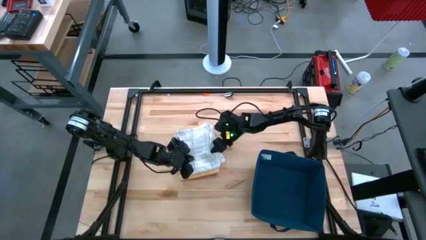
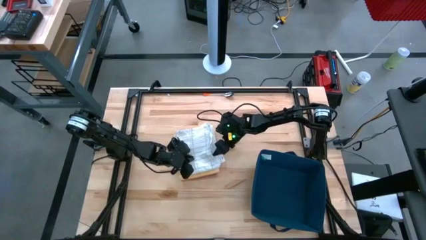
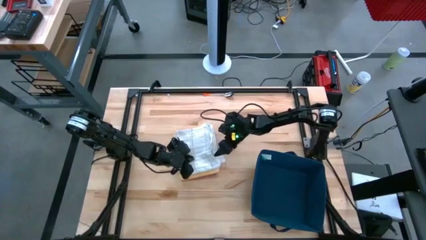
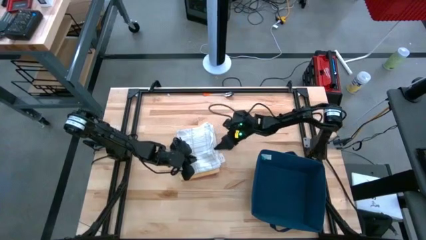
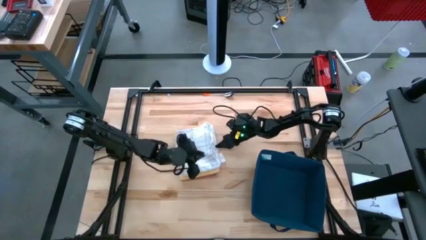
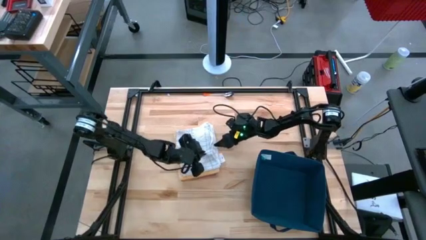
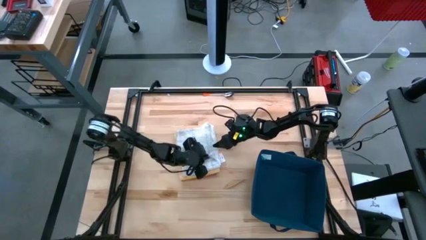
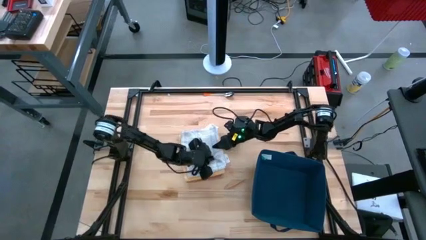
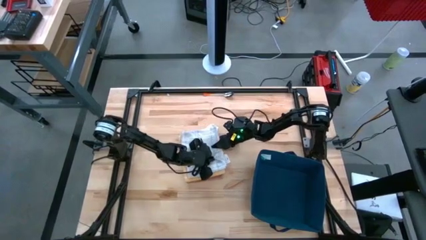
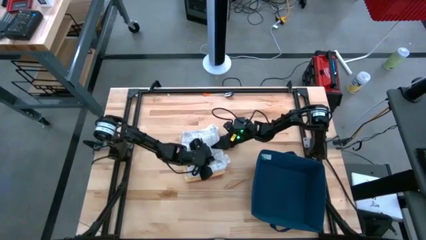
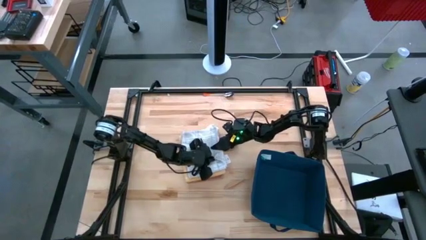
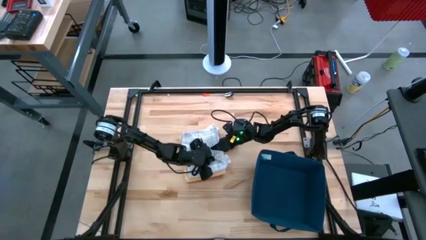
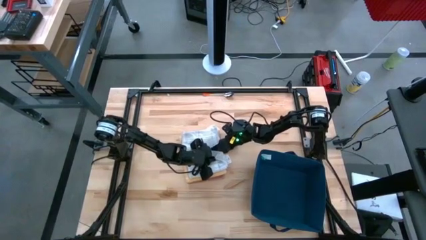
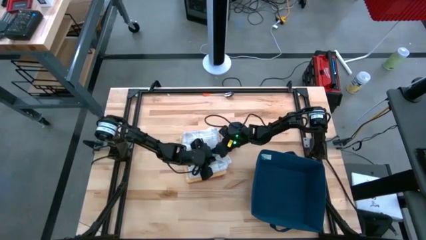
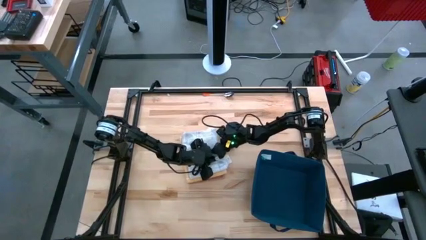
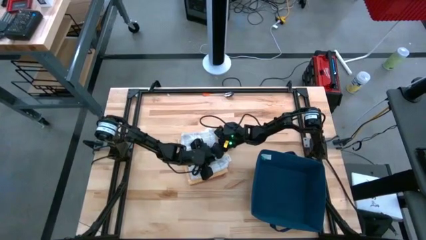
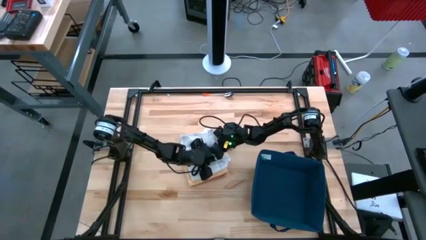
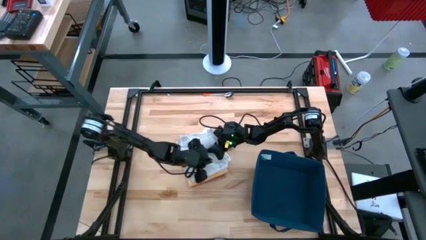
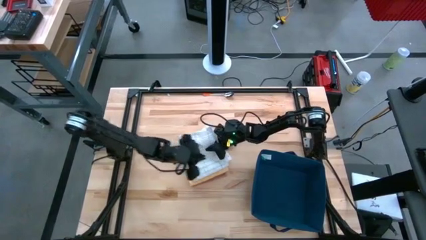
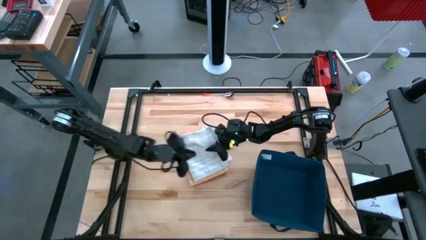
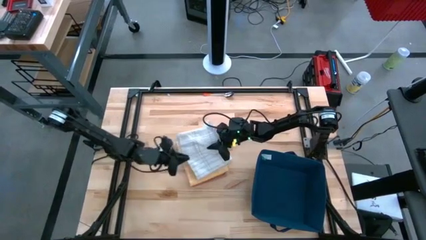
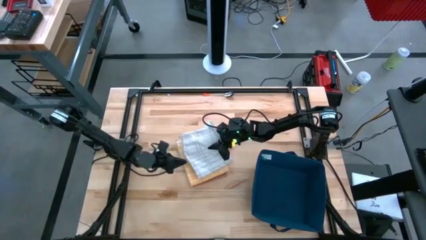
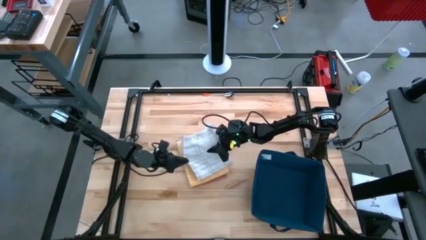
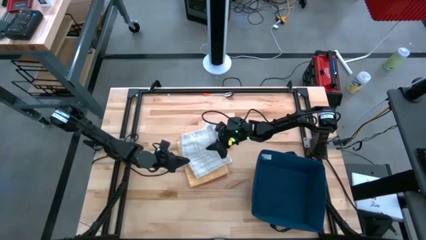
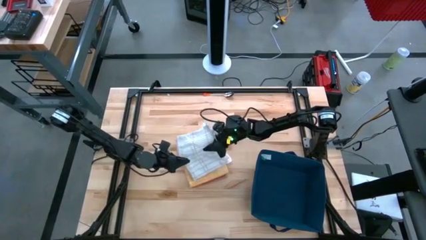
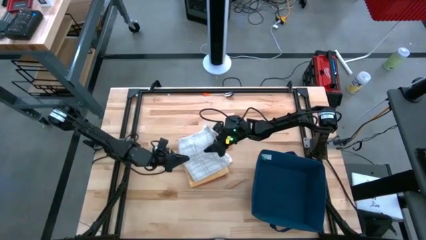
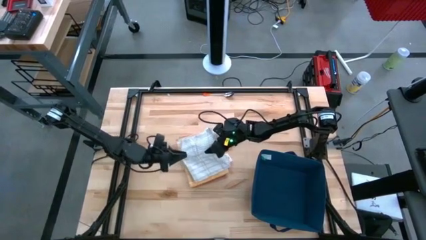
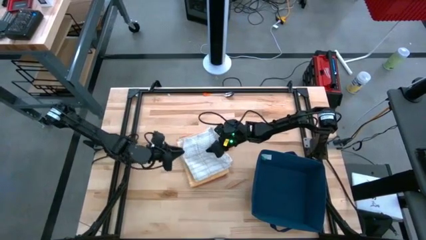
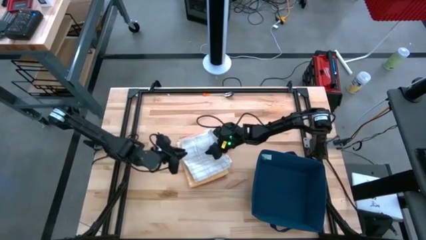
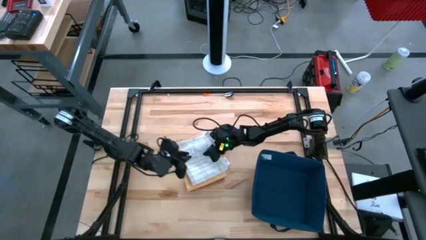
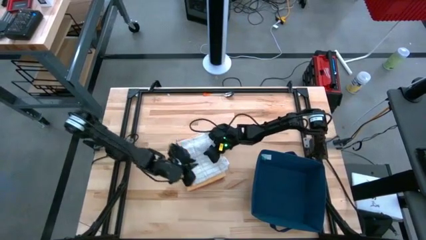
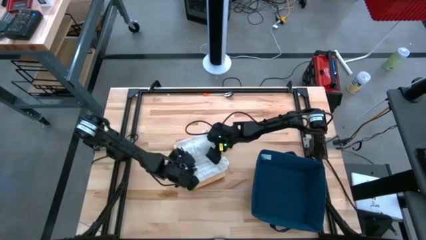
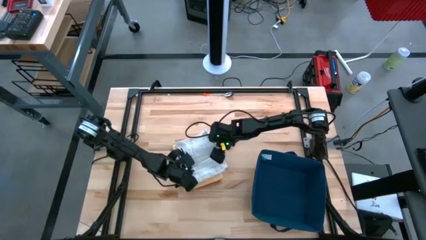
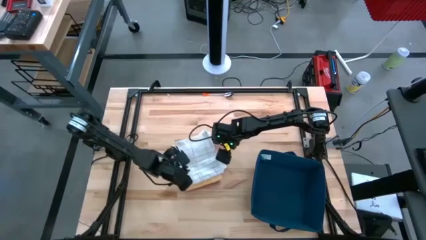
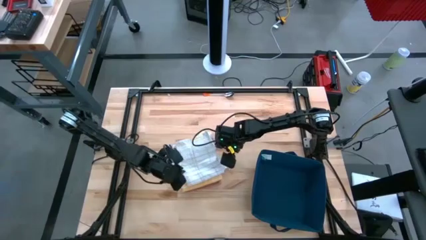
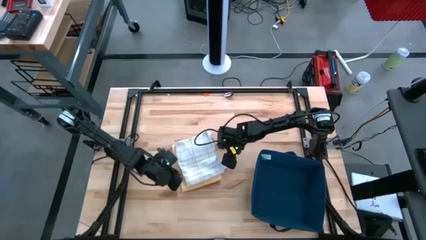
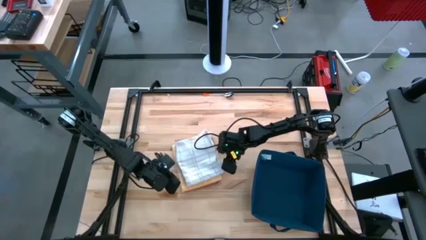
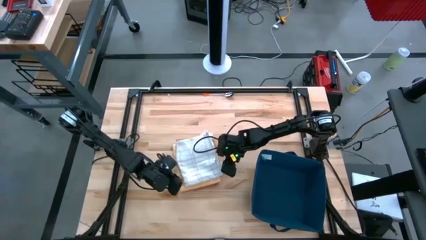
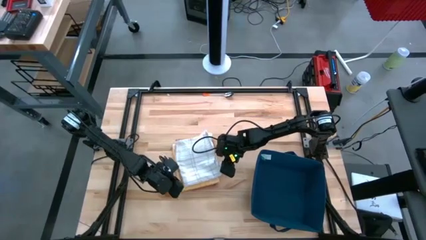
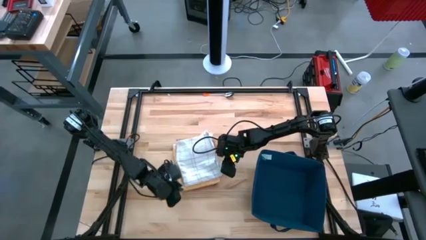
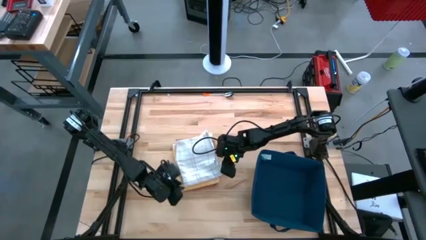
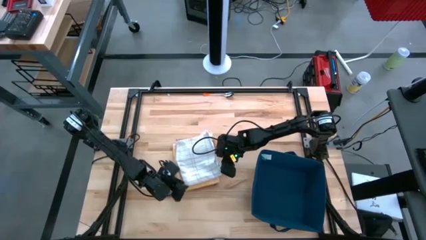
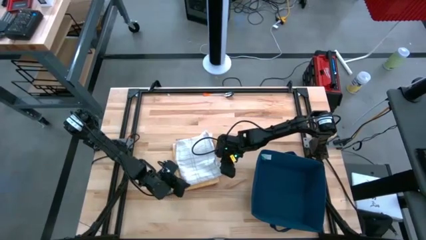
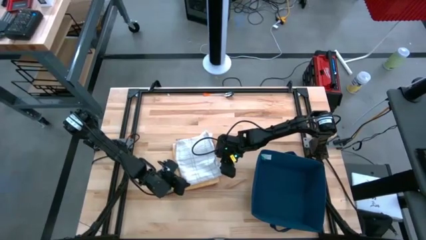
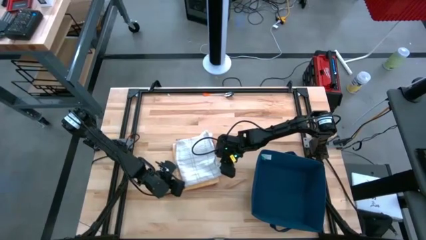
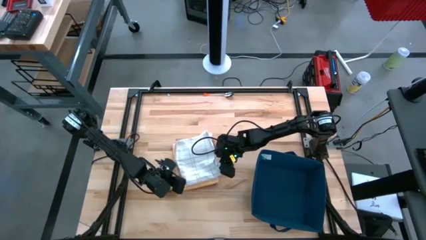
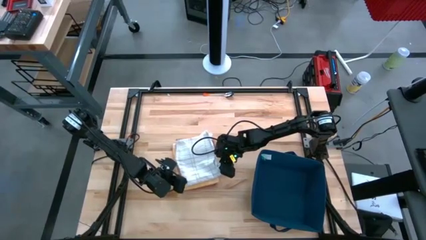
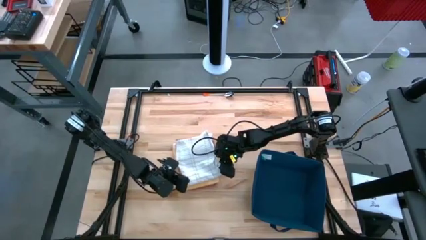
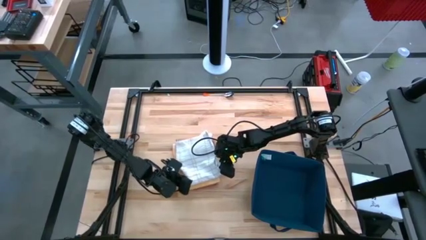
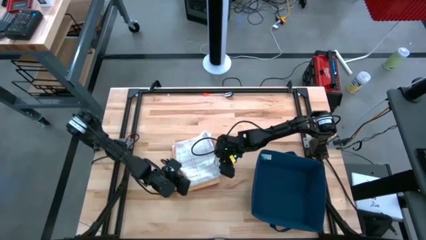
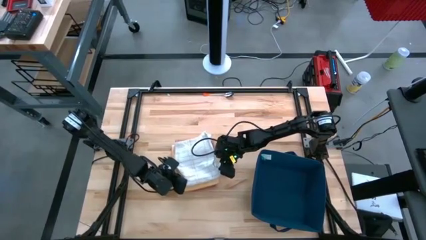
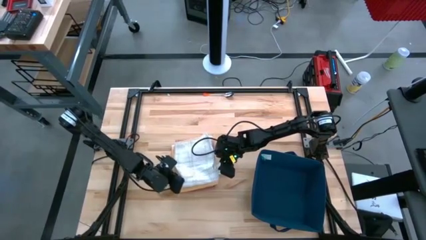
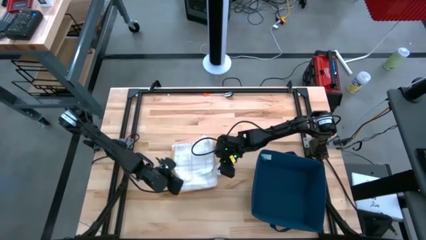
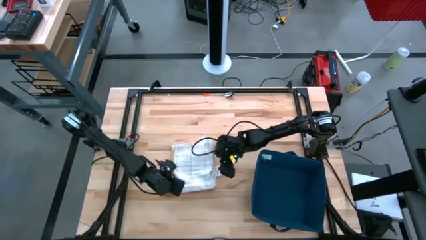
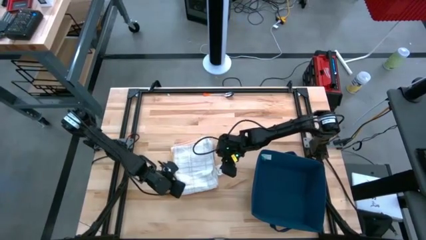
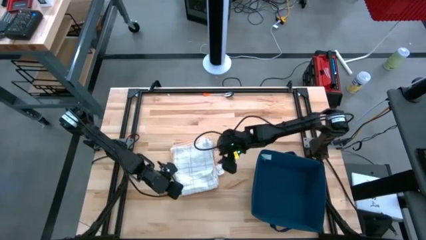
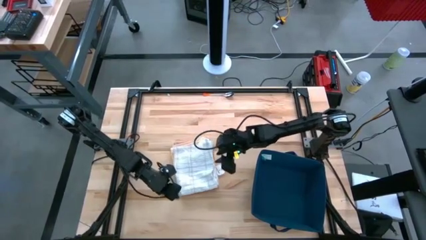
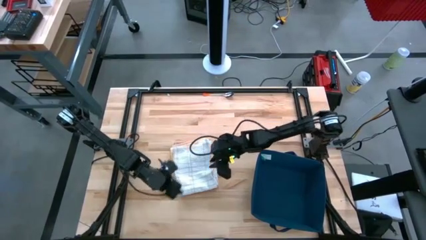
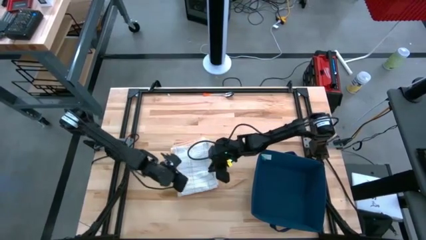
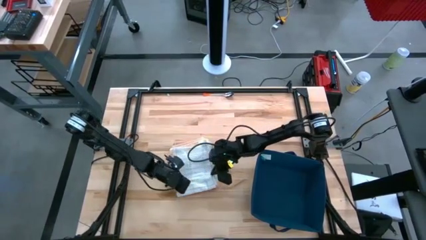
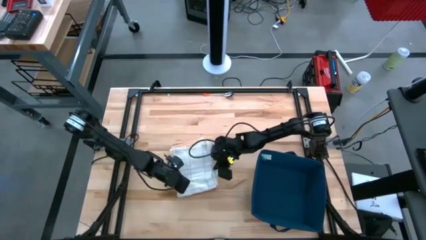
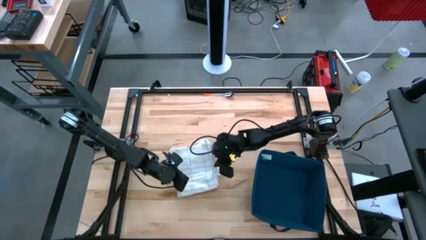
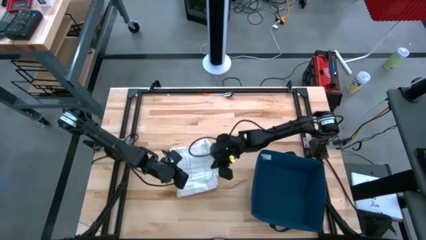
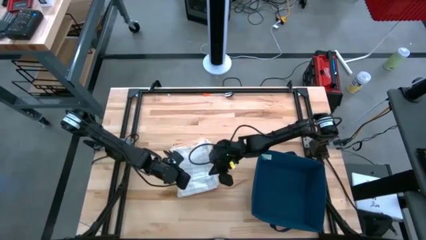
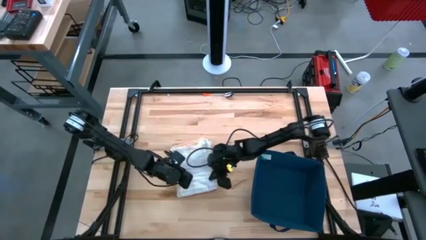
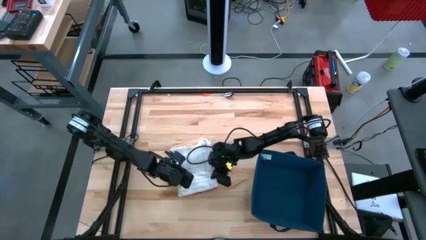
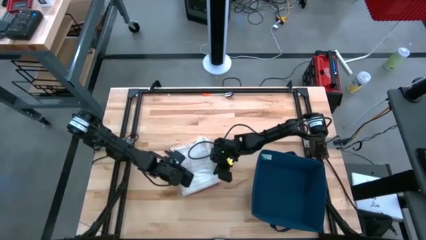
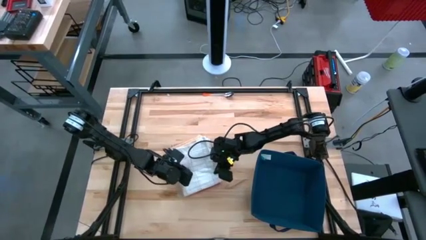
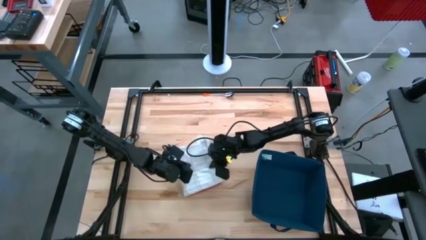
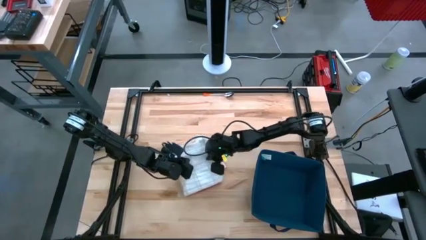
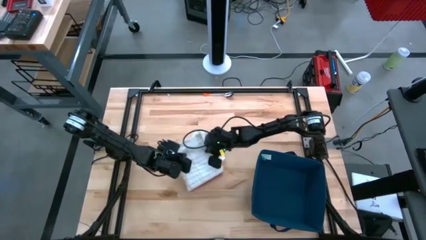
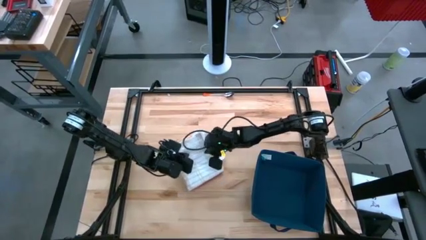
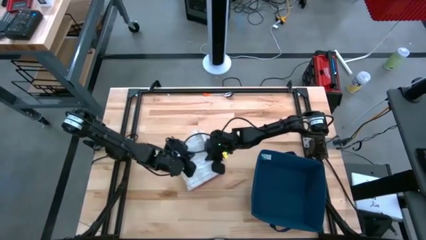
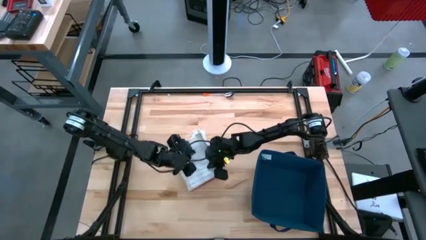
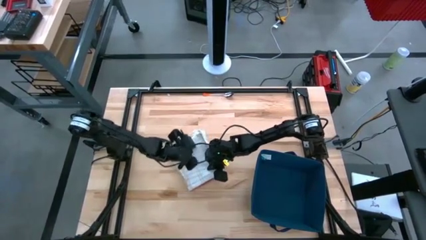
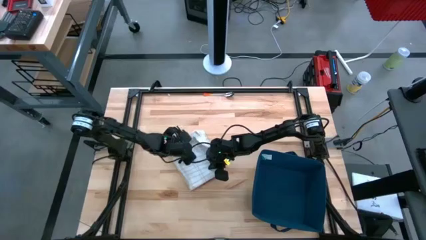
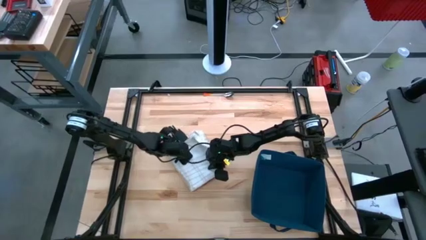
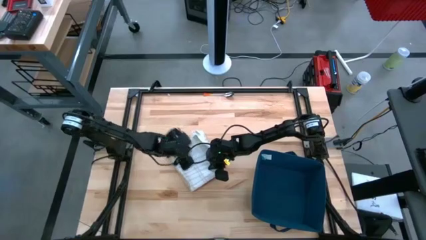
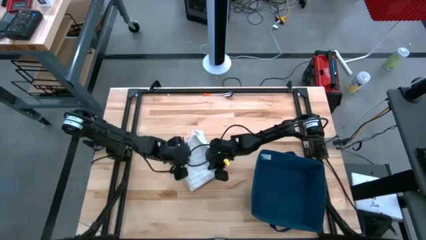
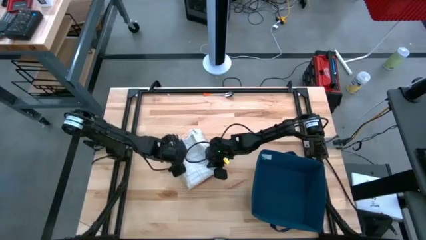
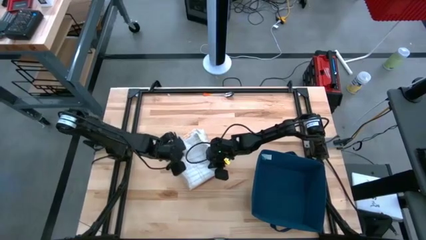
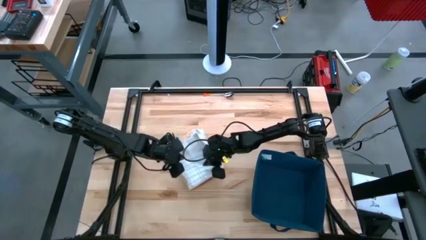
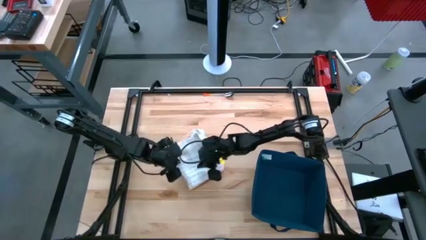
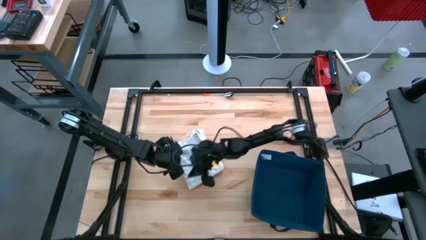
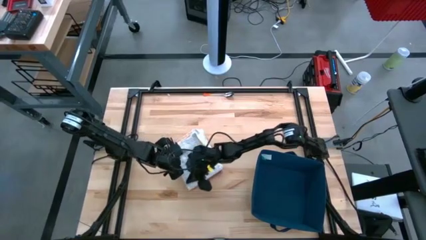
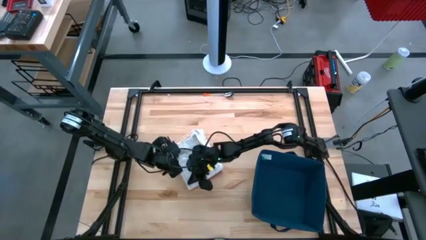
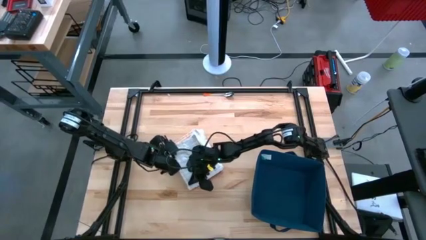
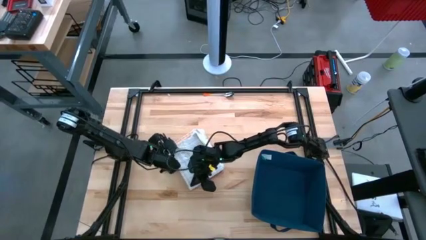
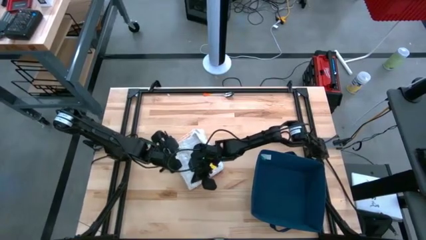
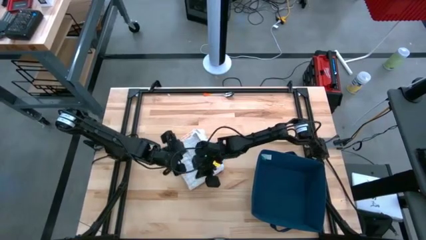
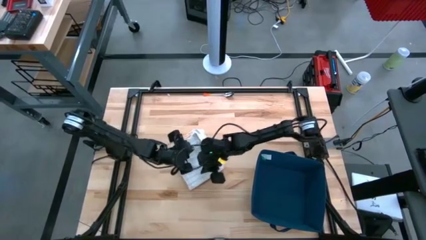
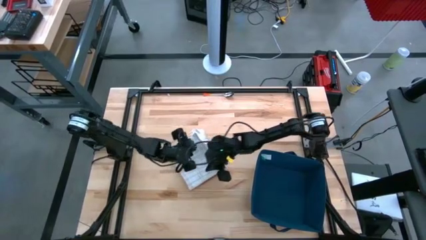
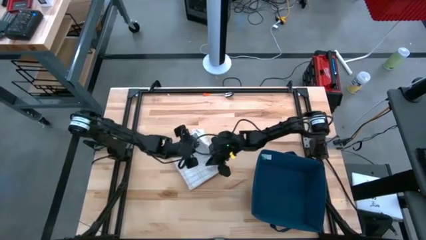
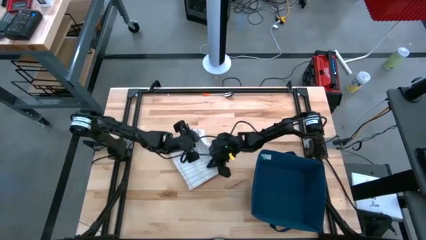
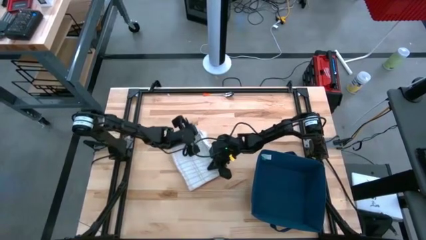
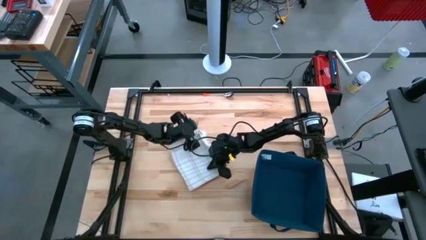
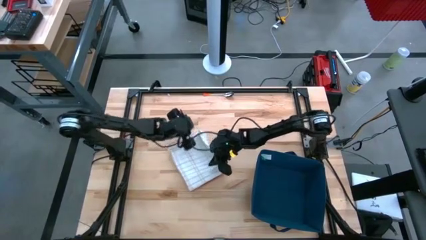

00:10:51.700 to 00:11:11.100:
Task: Fold towel
Stack the folded white towel on top of the folded yellow towel
